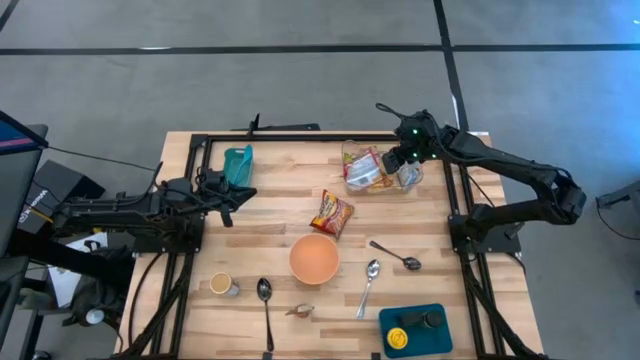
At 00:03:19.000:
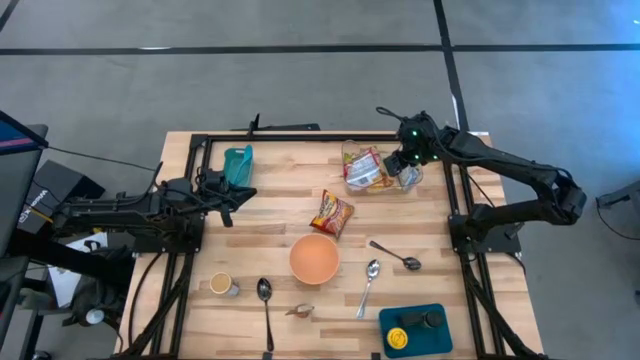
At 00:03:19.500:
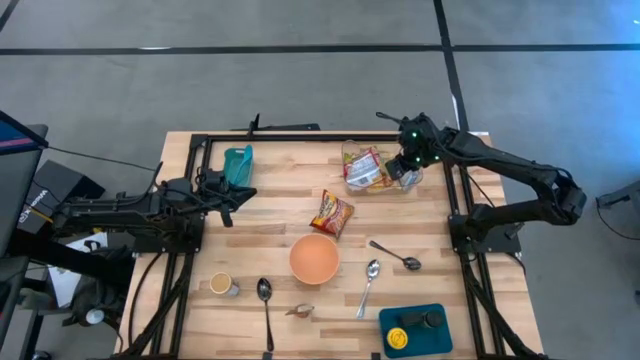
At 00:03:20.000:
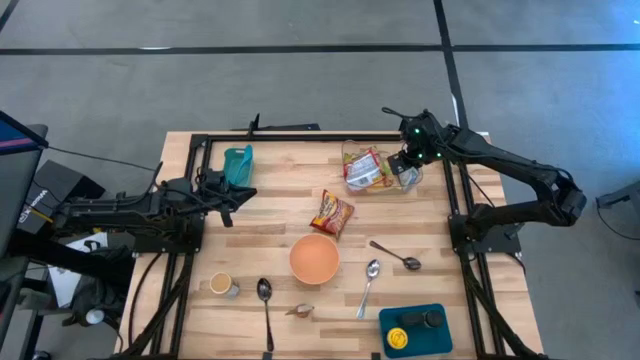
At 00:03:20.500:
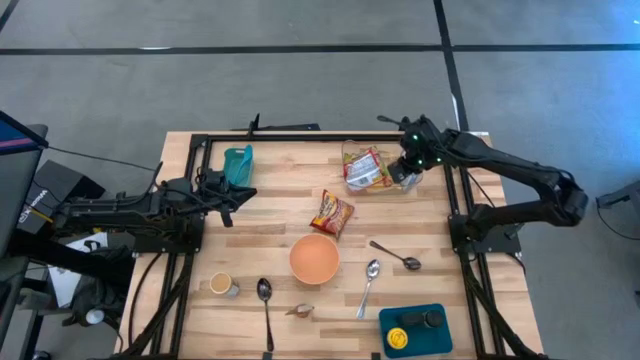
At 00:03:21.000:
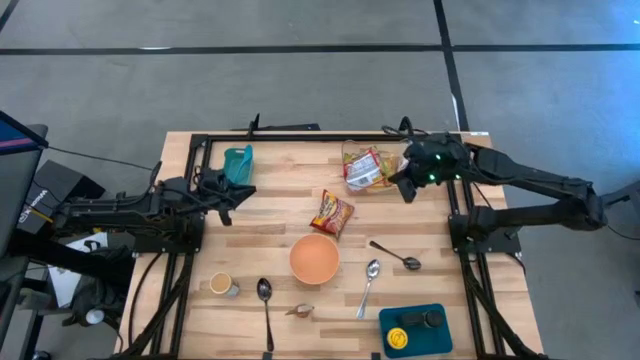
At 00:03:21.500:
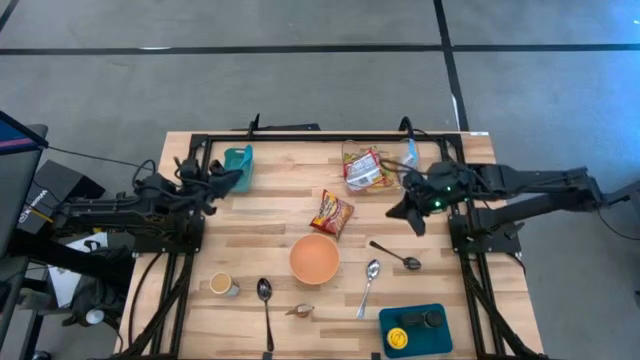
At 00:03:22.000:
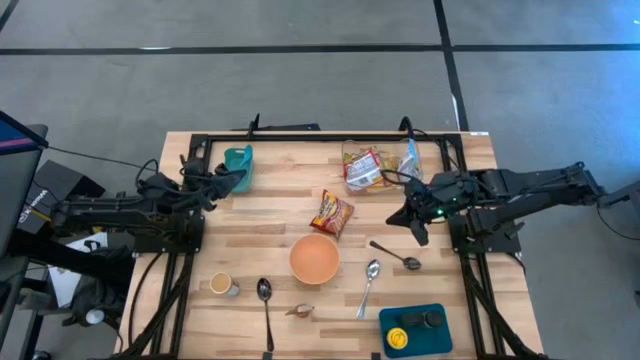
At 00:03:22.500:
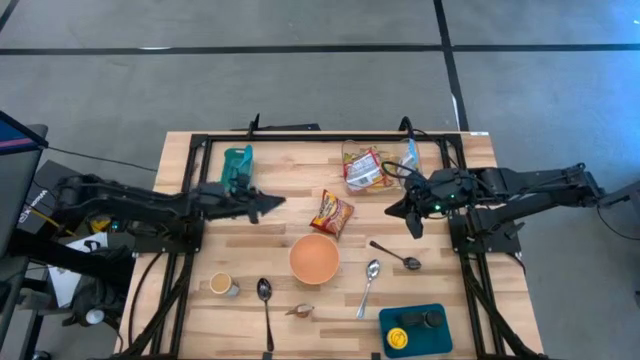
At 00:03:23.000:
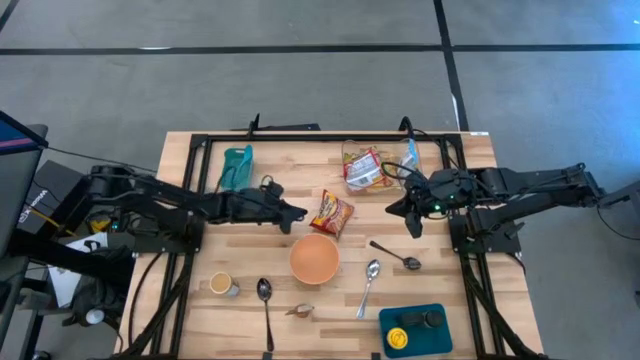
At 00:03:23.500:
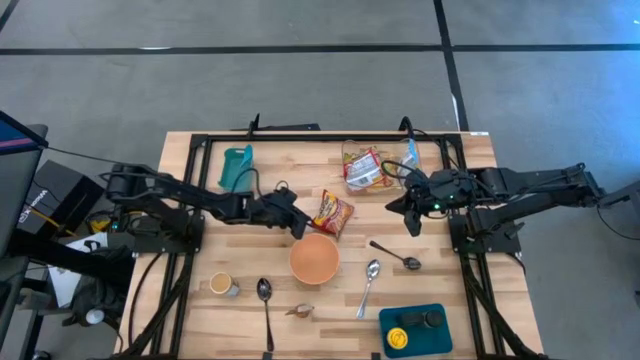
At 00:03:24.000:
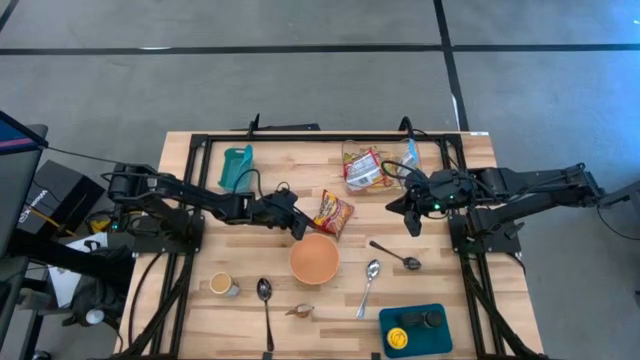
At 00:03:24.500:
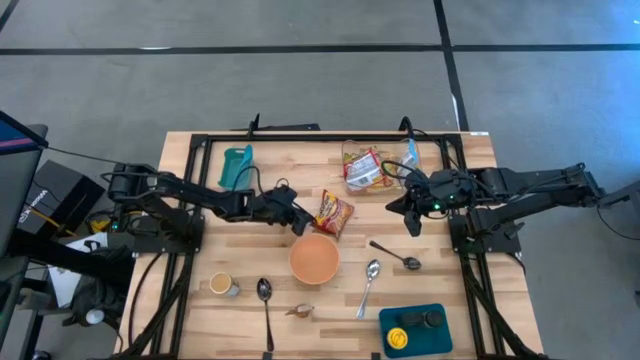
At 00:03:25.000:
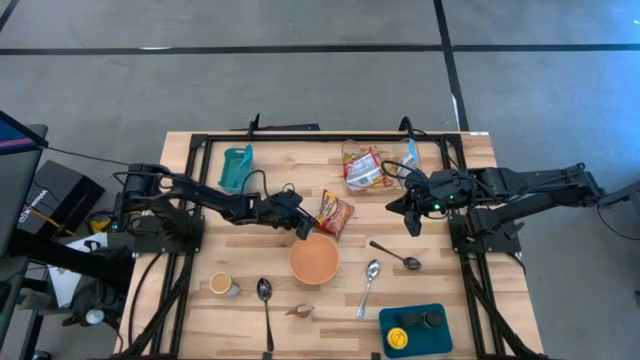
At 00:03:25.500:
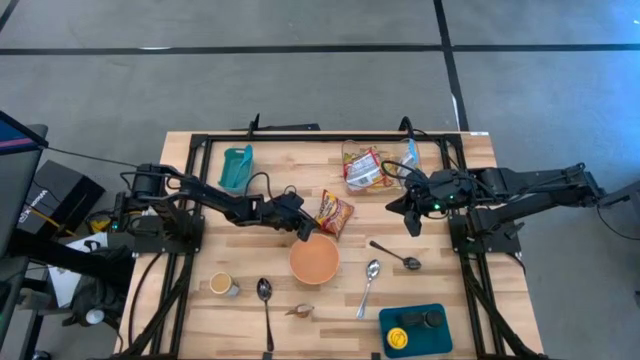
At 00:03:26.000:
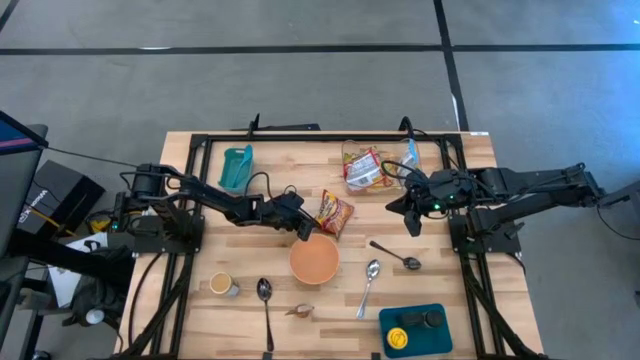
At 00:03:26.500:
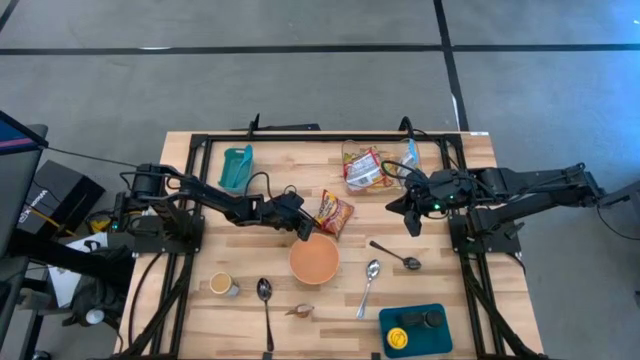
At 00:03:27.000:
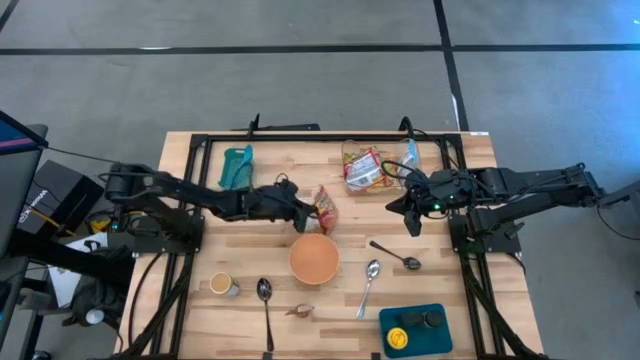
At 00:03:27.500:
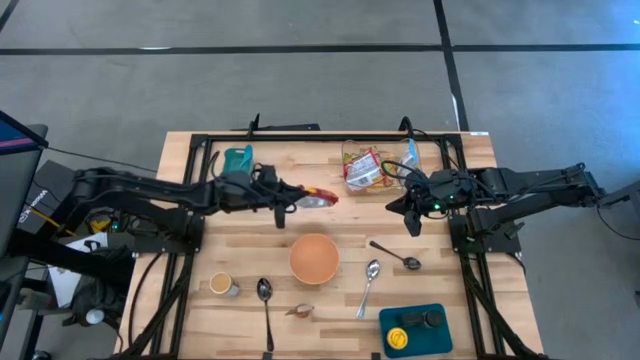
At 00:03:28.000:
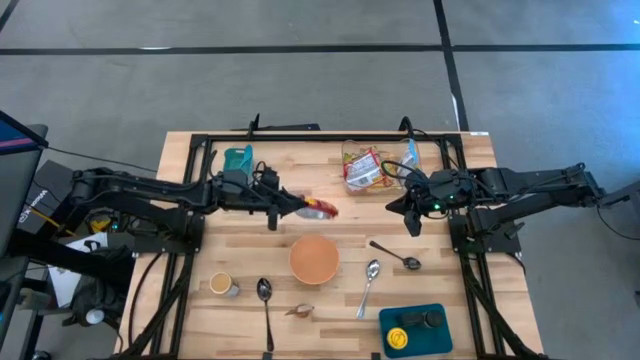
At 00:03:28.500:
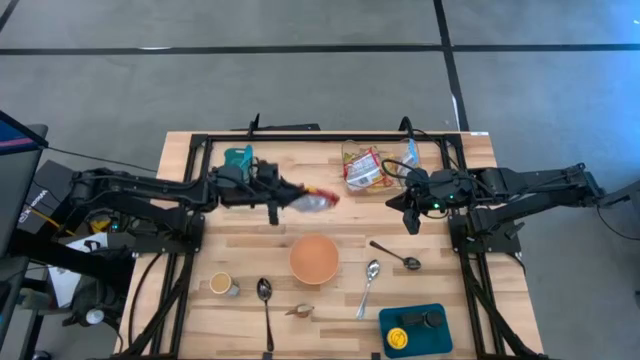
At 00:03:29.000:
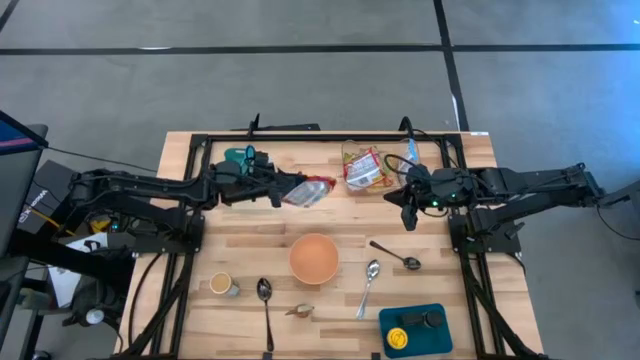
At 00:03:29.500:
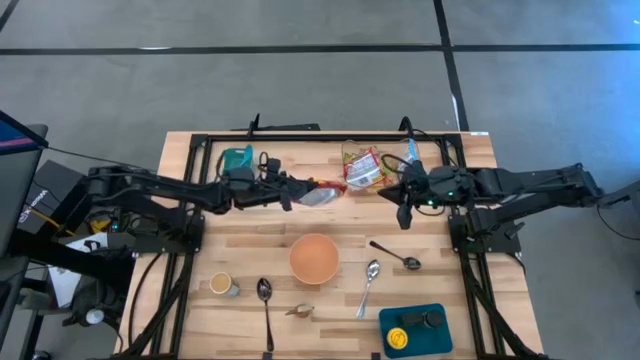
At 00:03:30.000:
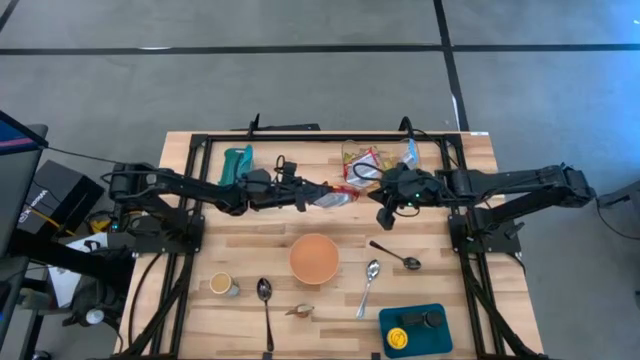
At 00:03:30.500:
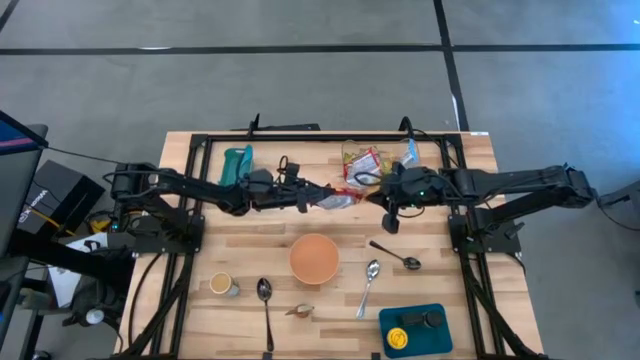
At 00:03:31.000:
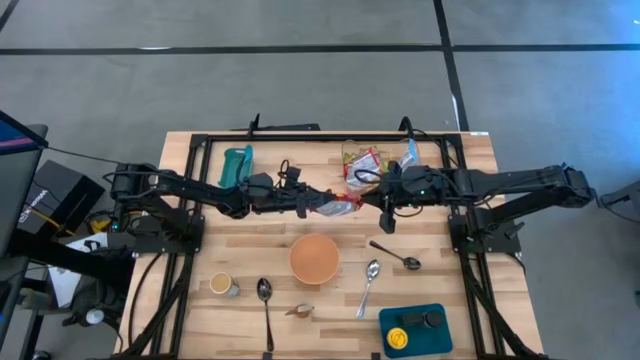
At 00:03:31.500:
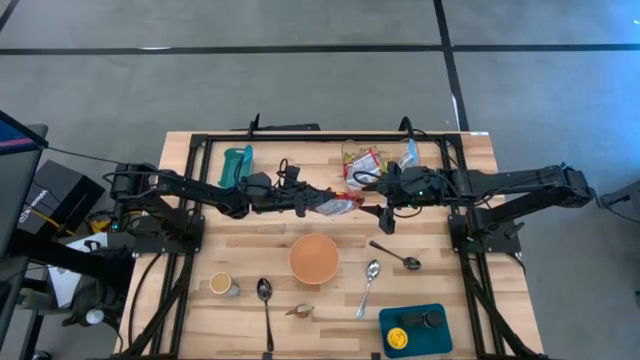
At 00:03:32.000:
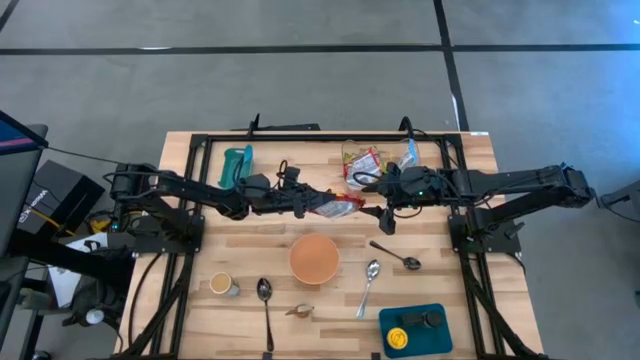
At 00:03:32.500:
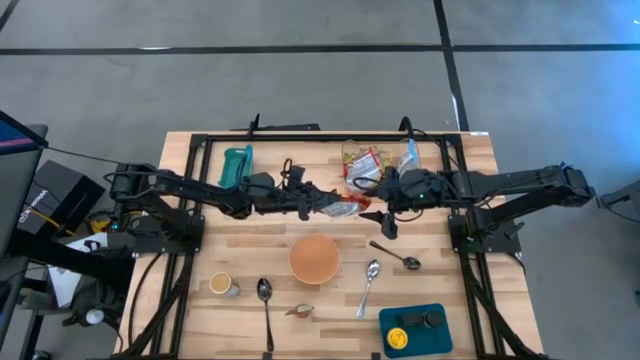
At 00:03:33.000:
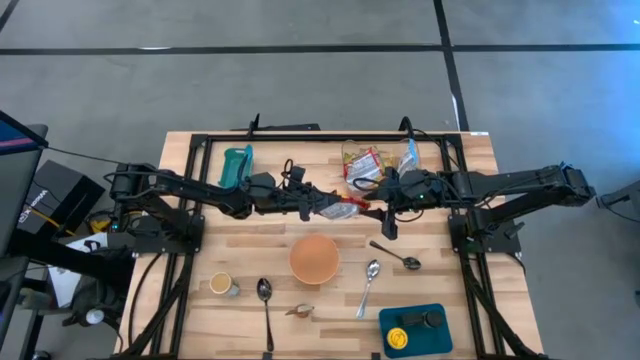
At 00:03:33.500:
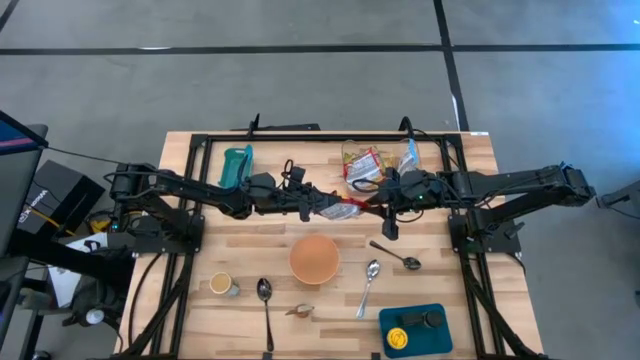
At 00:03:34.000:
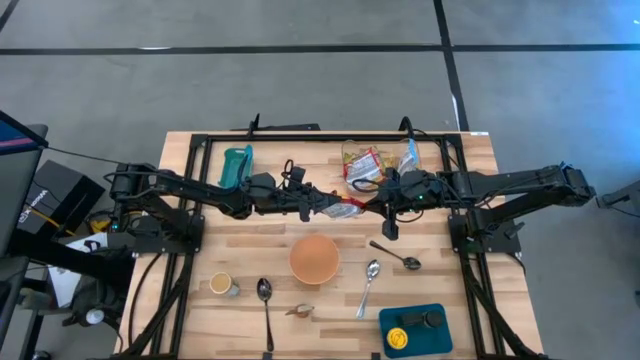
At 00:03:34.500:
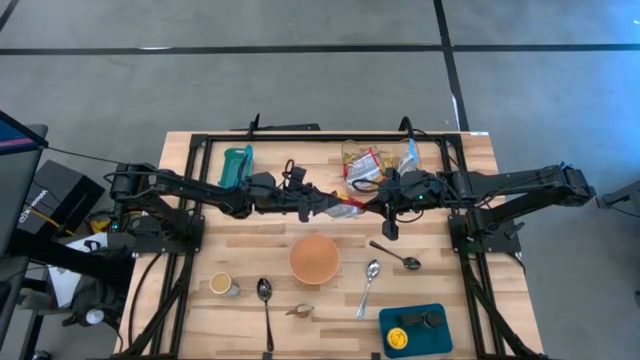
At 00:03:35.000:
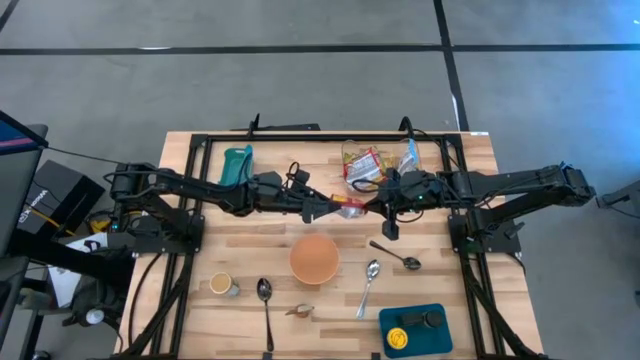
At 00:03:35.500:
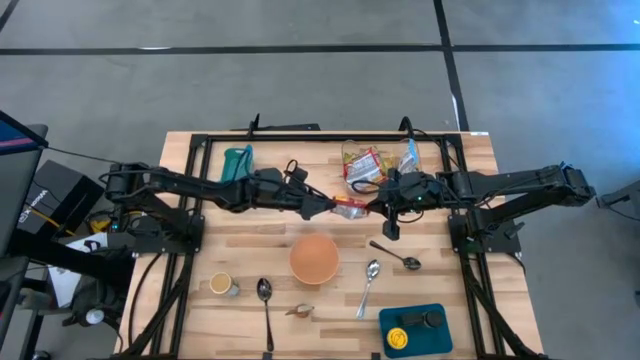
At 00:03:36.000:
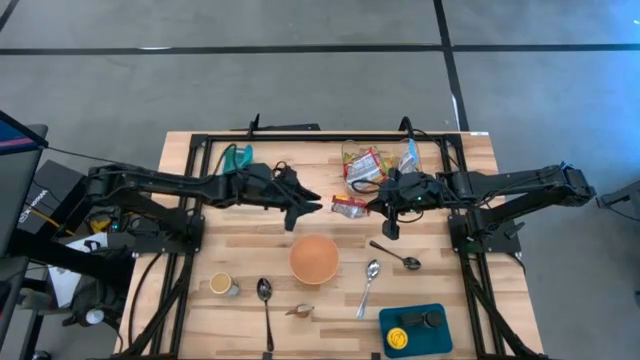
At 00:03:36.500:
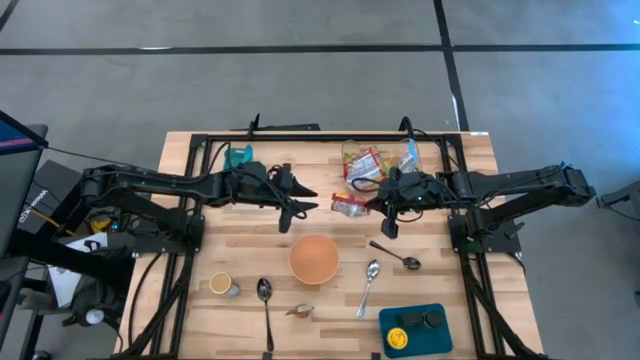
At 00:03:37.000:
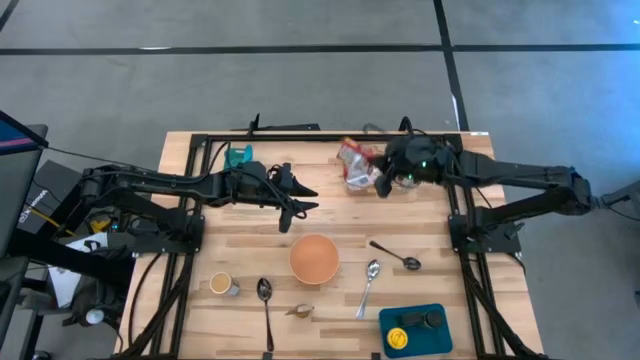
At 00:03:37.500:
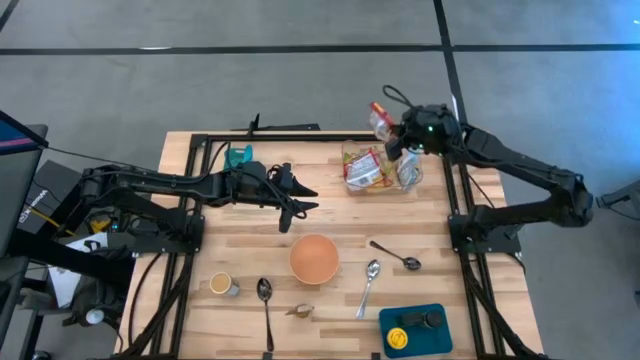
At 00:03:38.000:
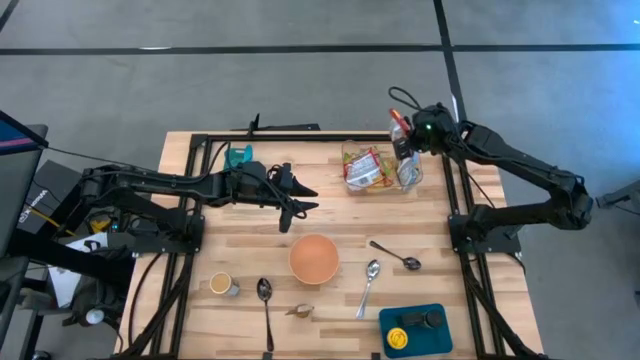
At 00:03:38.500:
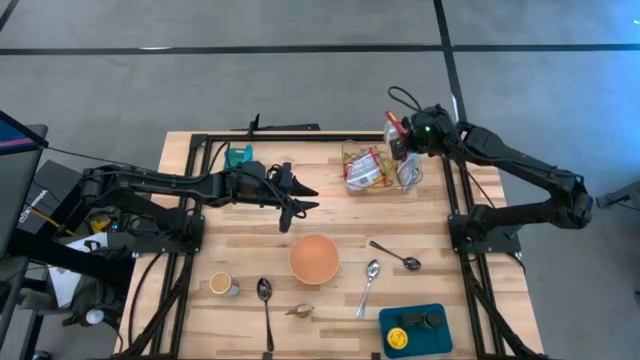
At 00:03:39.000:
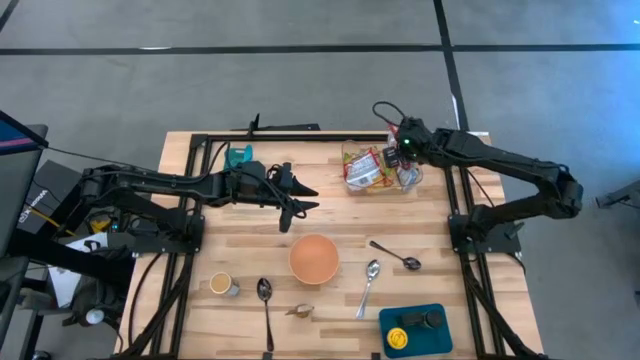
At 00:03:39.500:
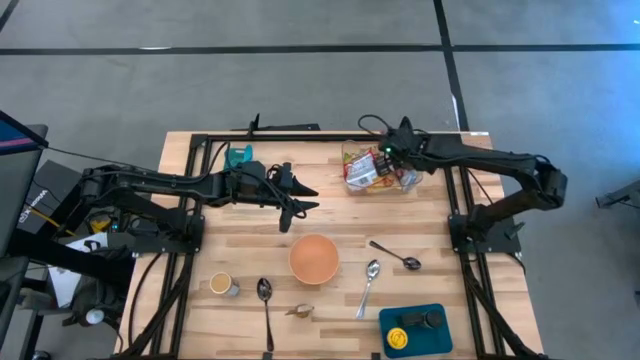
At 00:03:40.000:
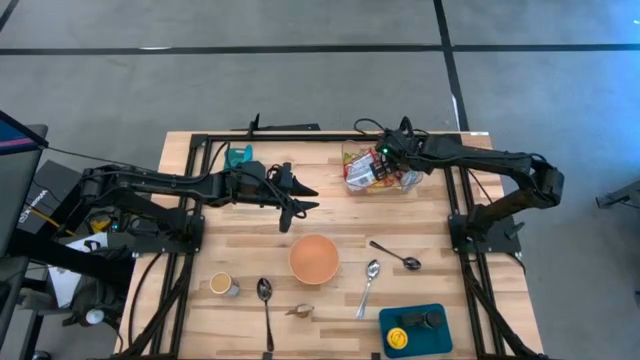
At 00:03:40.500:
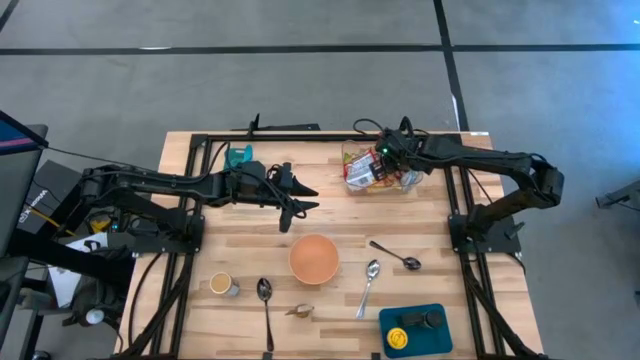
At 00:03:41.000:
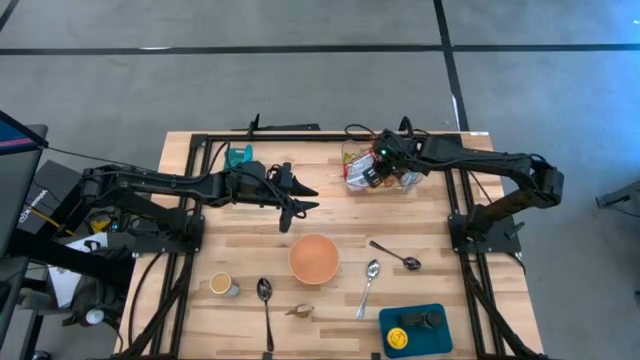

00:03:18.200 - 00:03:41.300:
Task: Pick & Place Food Item
Put the red noodle pack into the transparent bin

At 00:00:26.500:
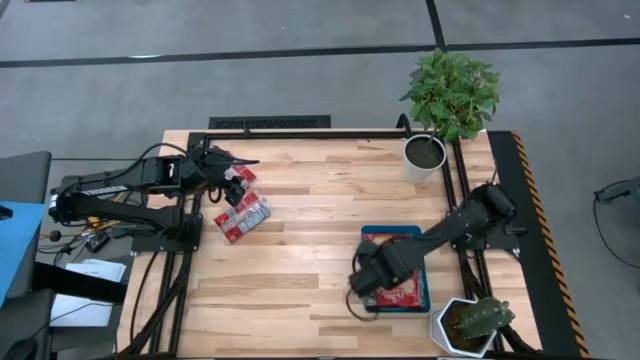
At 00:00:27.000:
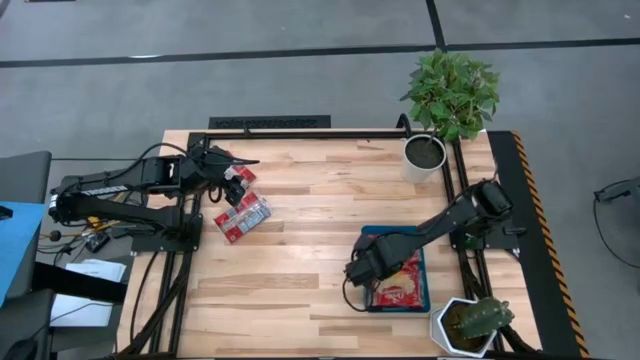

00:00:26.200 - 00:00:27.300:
Task: Sort popcorn bags into baskets
Adjust the red popcorn bag in the blue bin
